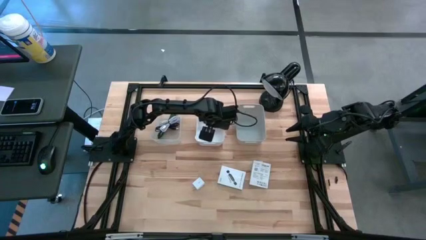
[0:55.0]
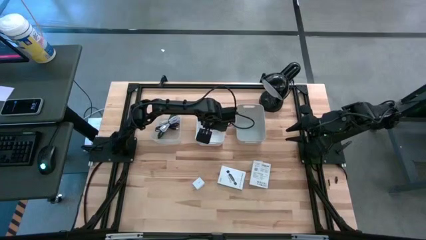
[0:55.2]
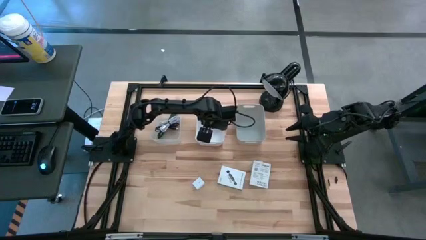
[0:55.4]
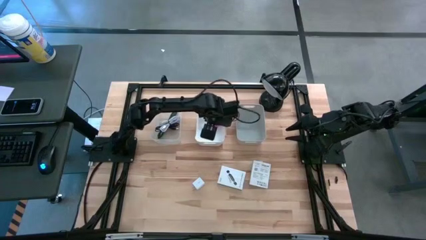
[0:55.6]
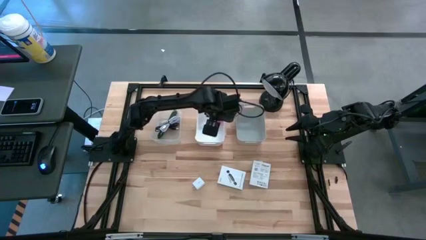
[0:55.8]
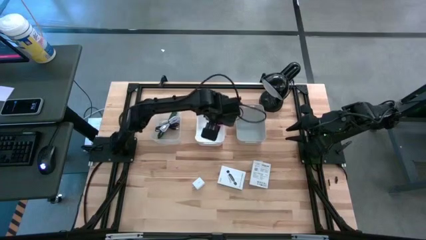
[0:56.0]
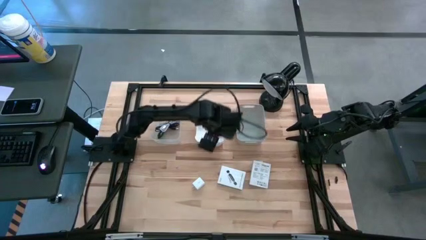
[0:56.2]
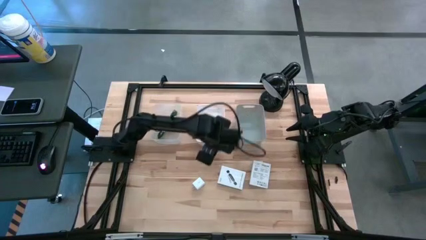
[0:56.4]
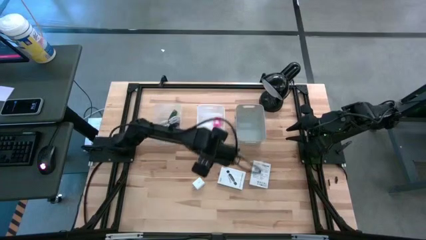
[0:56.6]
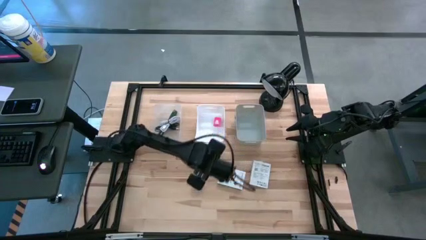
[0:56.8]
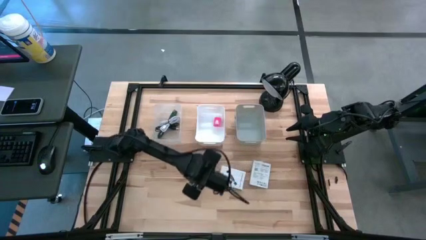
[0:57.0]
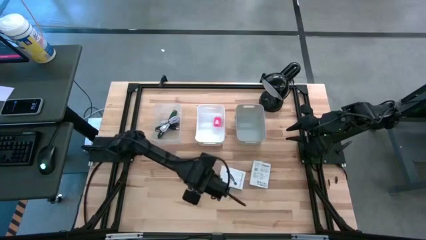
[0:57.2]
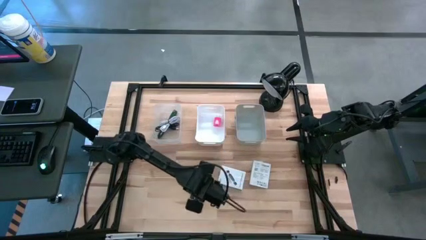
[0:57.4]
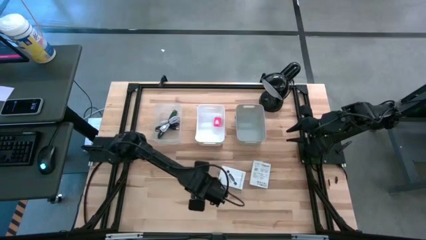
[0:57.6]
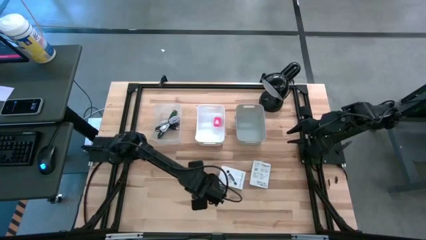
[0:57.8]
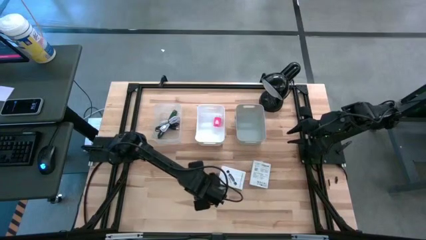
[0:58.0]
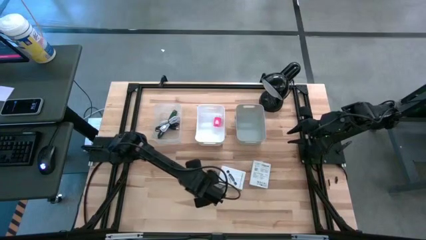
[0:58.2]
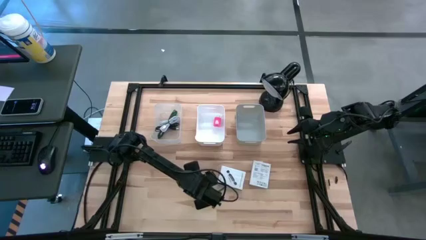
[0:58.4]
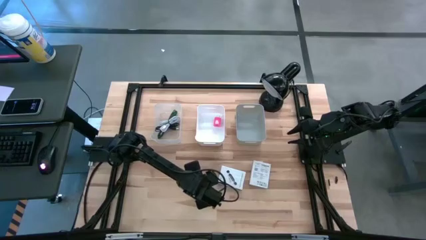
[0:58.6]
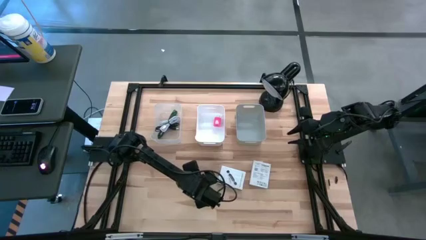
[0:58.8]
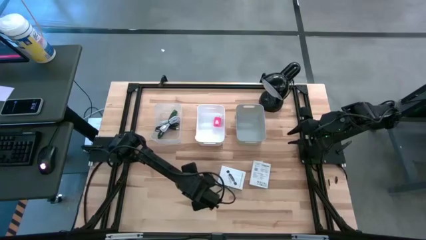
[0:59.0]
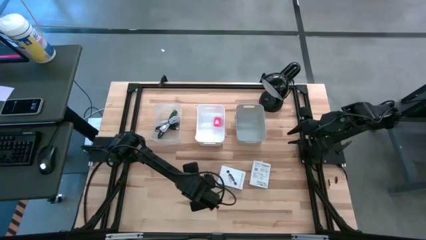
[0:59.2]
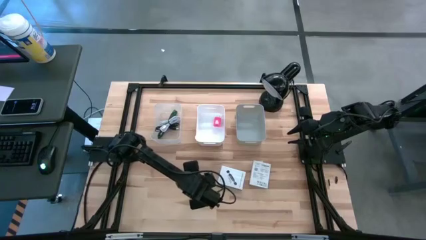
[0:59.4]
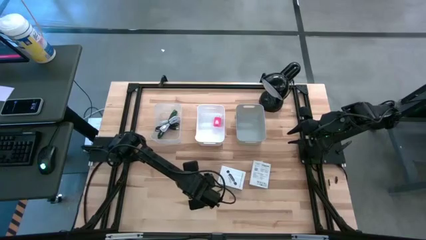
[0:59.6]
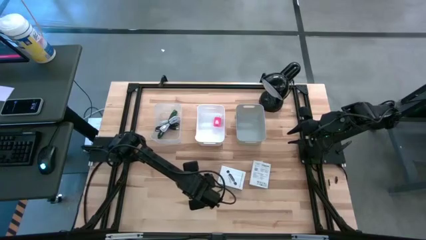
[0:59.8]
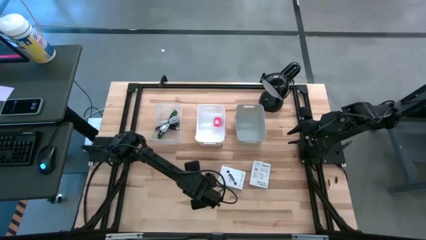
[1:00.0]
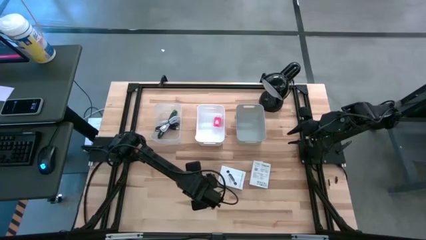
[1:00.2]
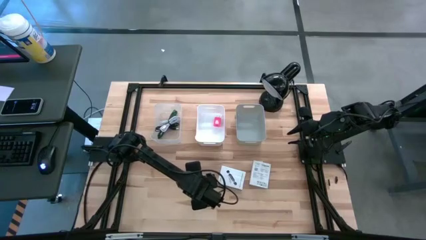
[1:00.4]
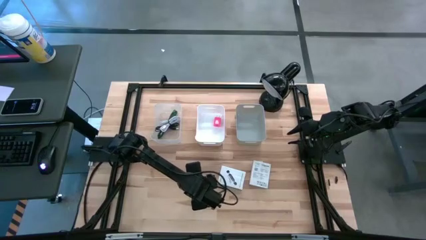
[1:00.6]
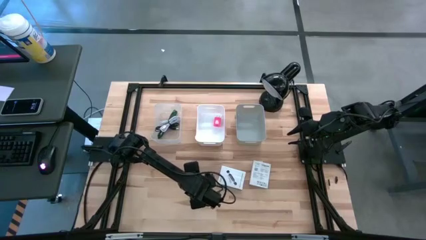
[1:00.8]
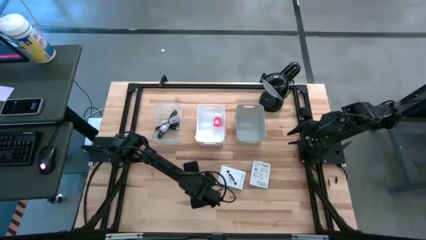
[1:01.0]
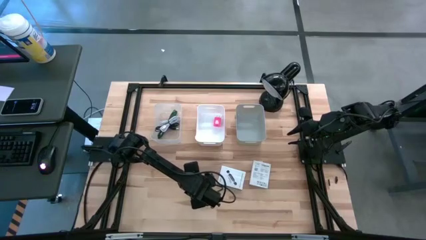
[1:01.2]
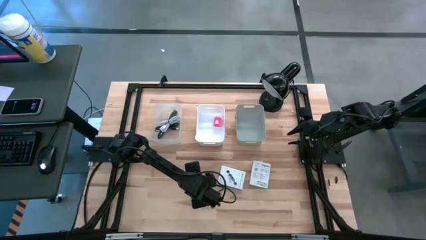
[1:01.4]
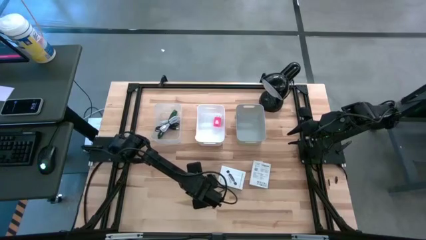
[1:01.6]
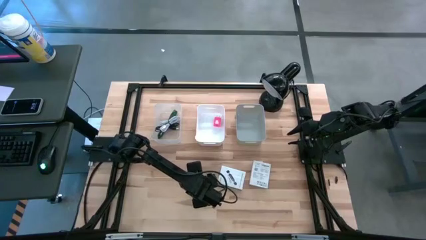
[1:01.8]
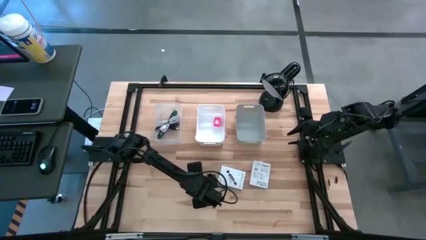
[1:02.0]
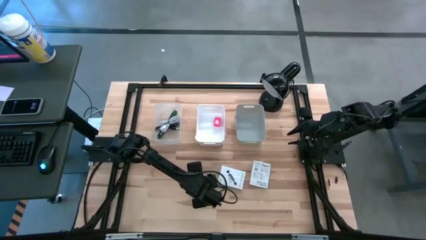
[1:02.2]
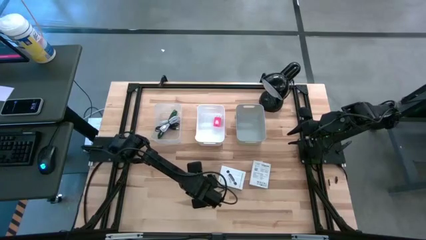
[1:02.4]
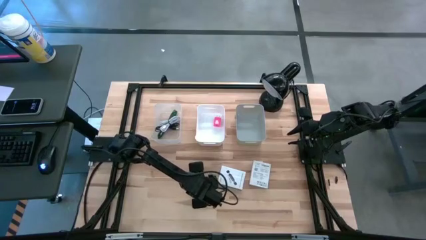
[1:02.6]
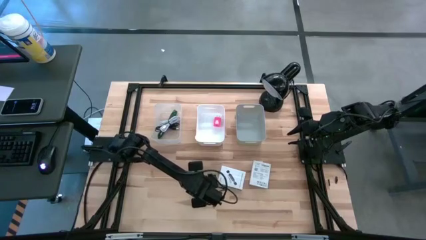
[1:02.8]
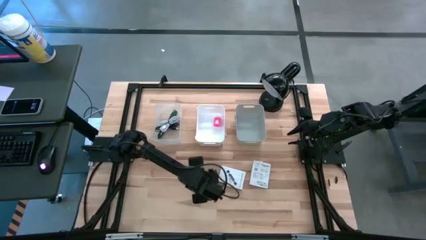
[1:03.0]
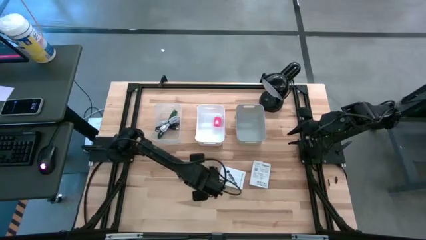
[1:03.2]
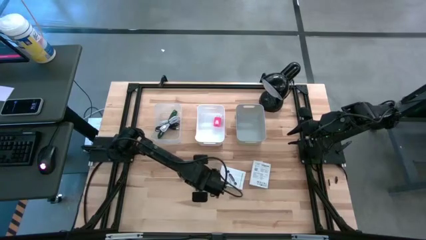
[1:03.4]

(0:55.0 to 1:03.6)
Task: Pick and place items into bin
Put the white adapter into the white bin

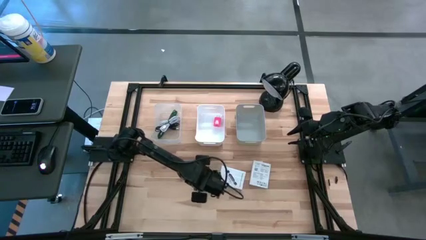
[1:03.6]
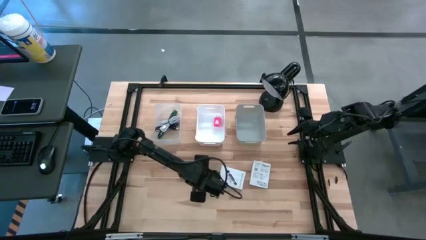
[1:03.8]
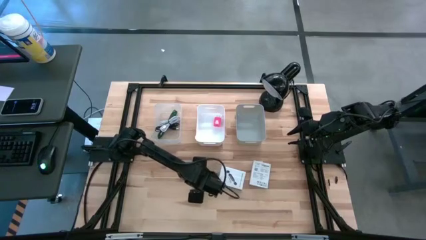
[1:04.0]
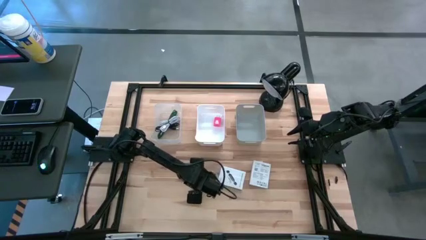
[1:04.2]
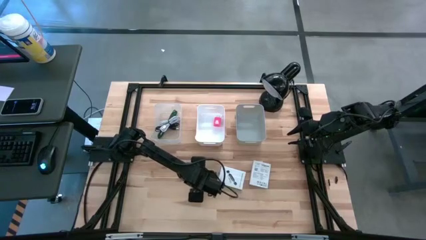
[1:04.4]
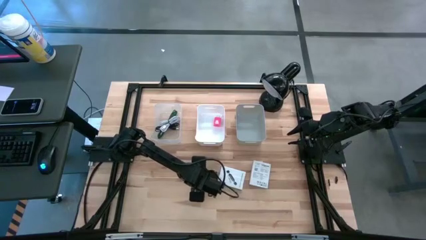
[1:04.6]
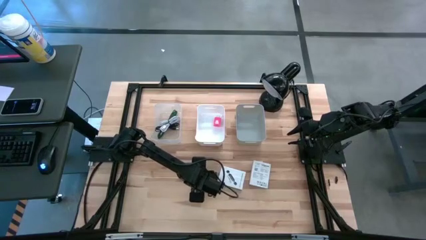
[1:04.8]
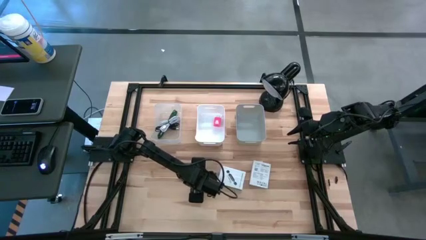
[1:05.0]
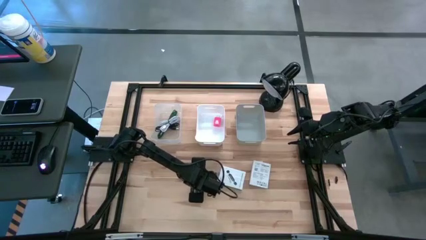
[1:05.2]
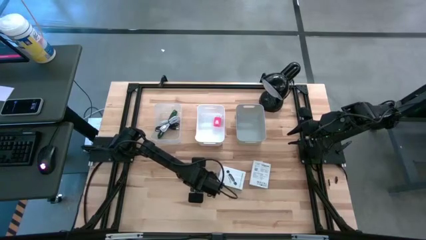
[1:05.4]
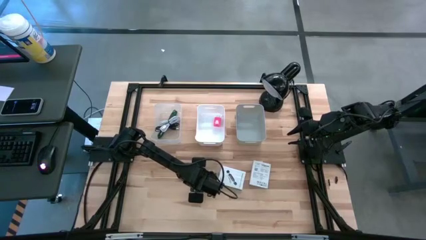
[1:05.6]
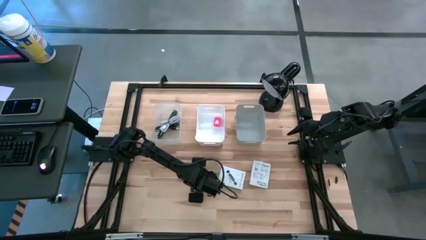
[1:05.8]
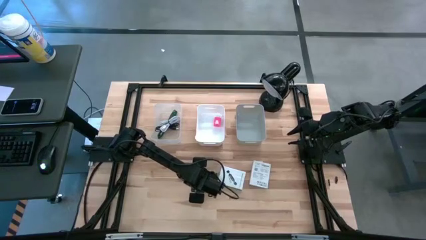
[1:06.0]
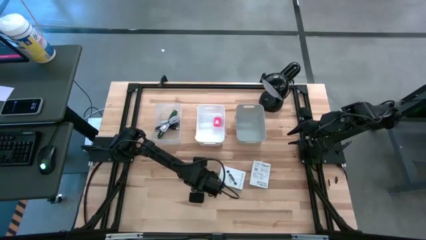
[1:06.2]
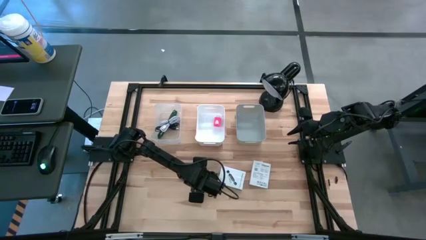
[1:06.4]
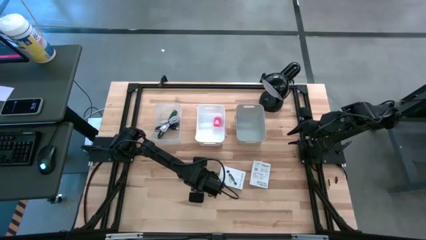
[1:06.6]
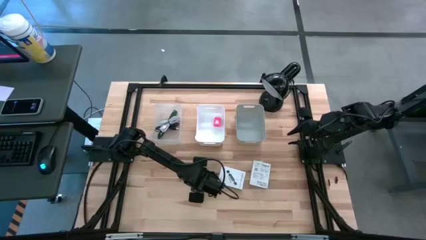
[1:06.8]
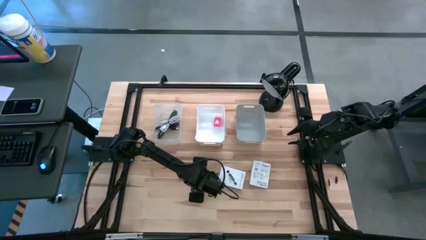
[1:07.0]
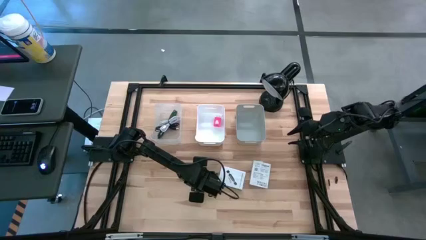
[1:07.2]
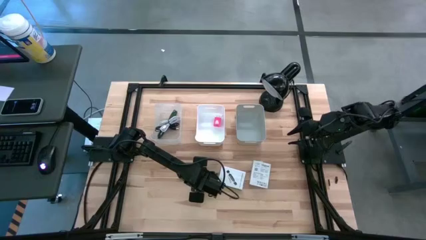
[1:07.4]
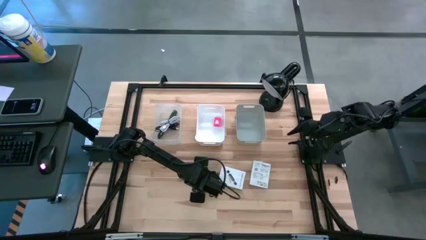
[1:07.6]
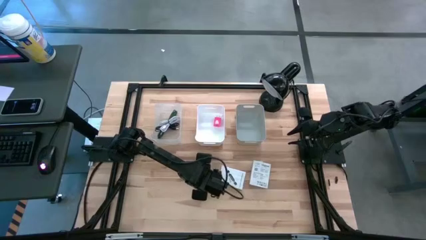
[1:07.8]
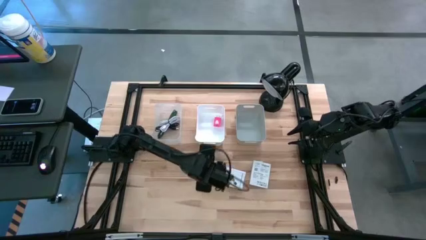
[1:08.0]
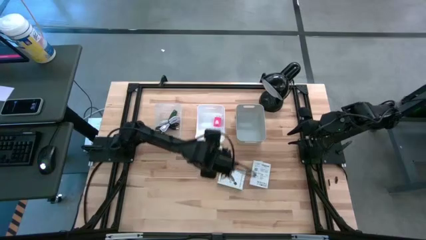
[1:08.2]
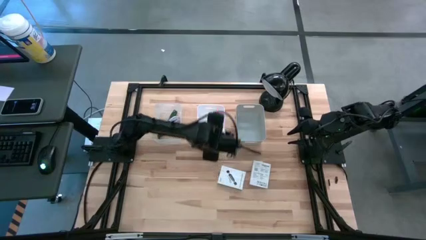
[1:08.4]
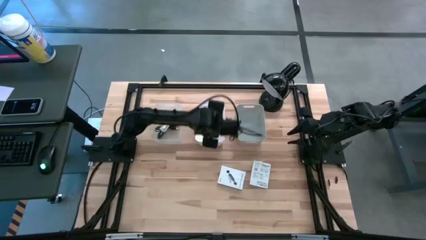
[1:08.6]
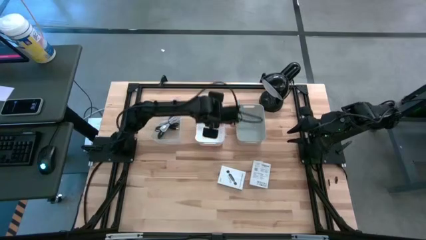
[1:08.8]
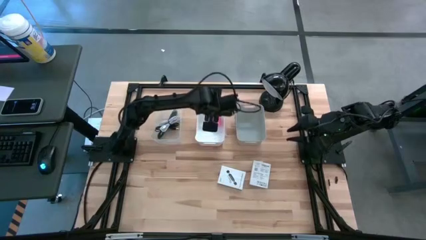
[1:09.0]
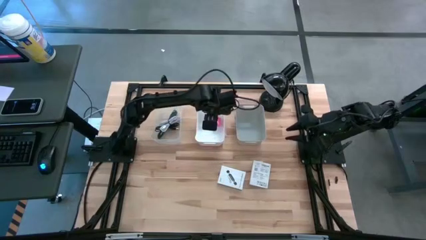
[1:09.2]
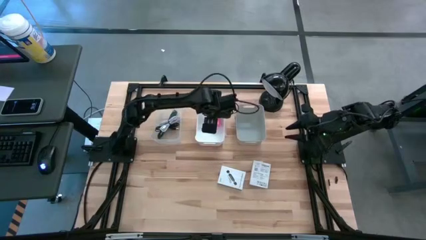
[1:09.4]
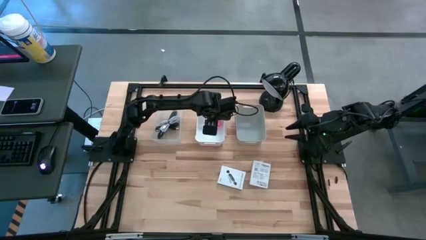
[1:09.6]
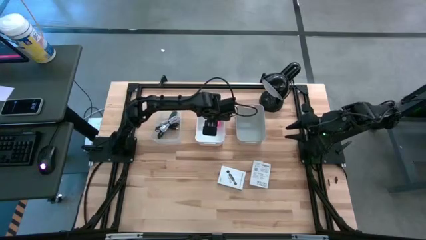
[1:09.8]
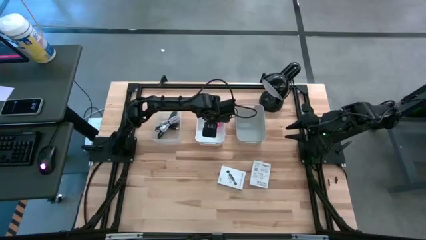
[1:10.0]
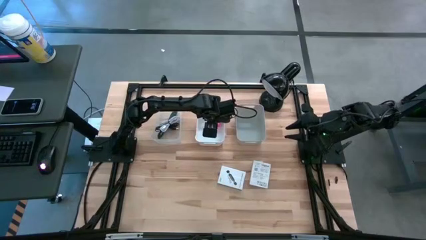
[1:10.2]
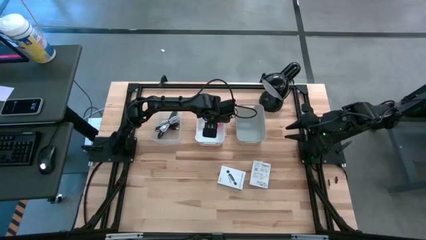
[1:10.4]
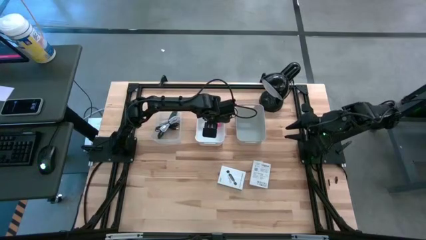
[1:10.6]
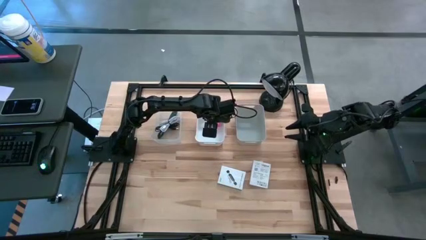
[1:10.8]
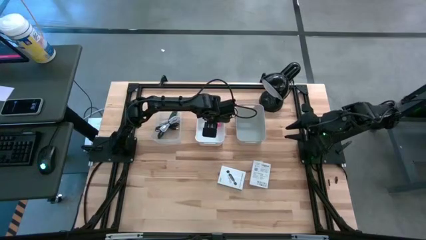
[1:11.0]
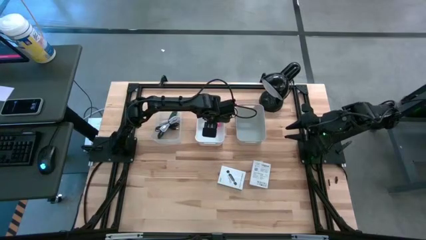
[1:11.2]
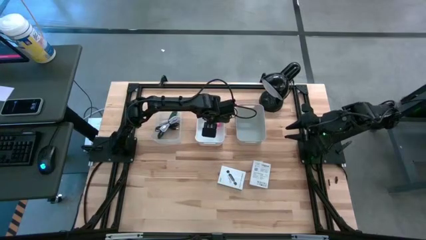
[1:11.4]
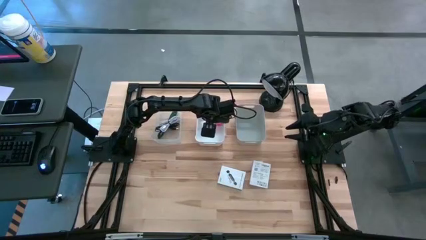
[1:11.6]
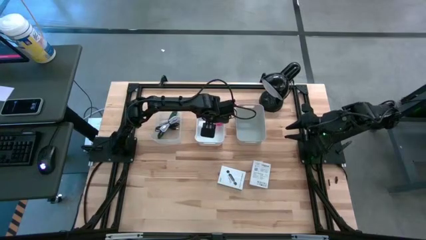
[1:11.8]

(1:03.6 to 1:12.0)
Put the white adapter into the white bin
